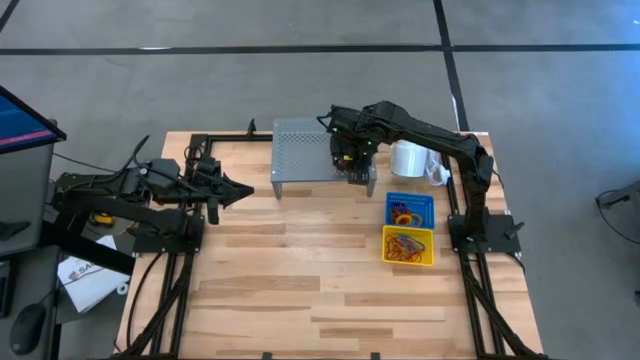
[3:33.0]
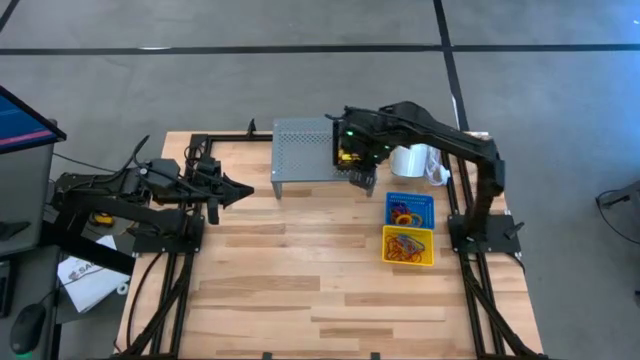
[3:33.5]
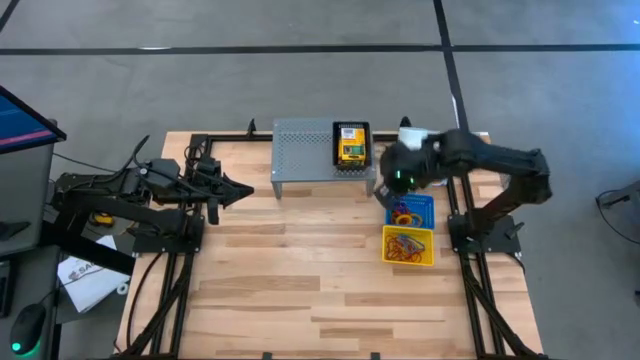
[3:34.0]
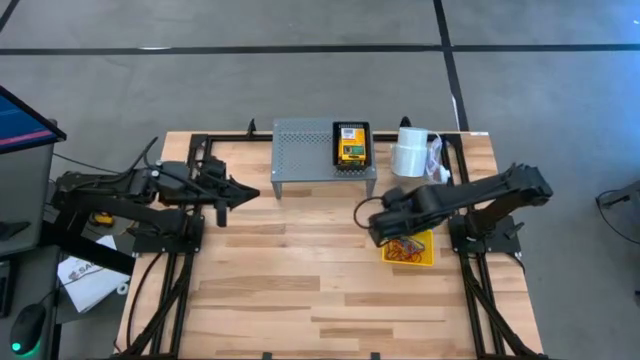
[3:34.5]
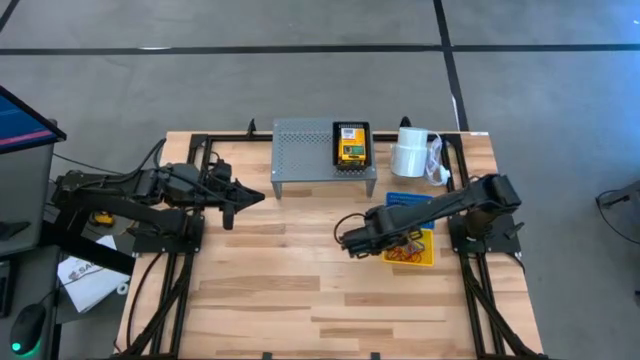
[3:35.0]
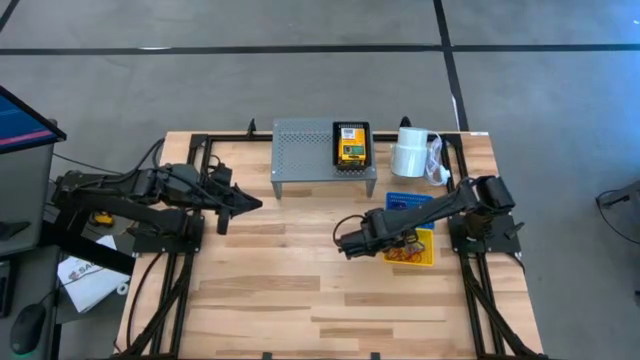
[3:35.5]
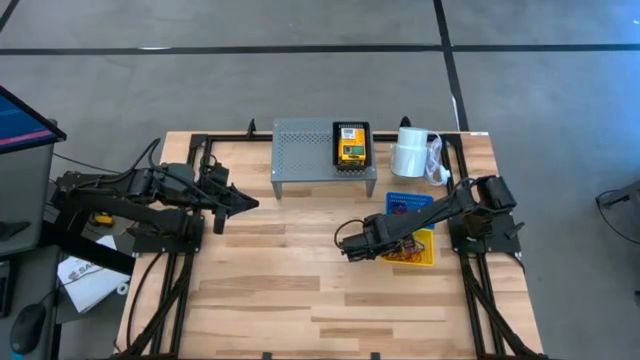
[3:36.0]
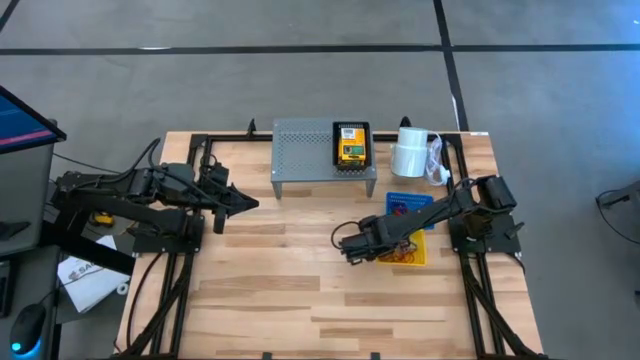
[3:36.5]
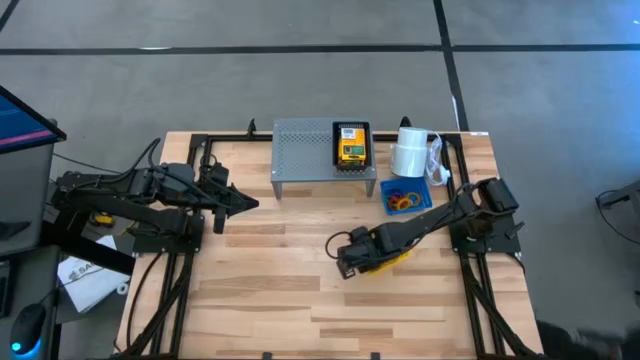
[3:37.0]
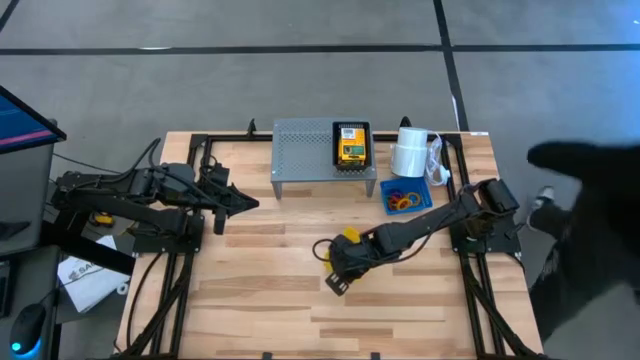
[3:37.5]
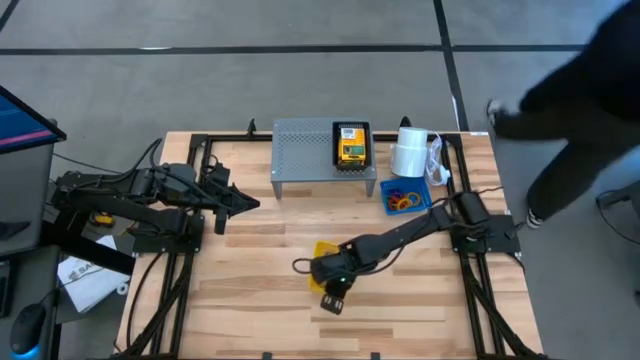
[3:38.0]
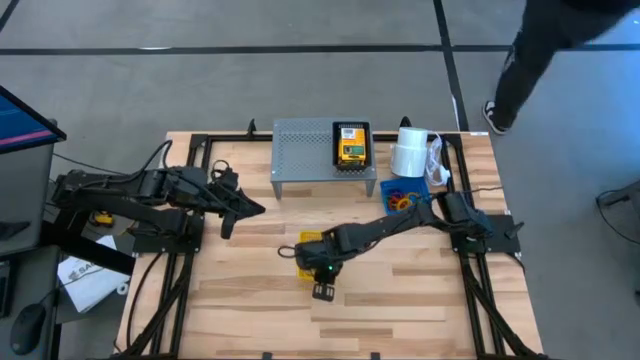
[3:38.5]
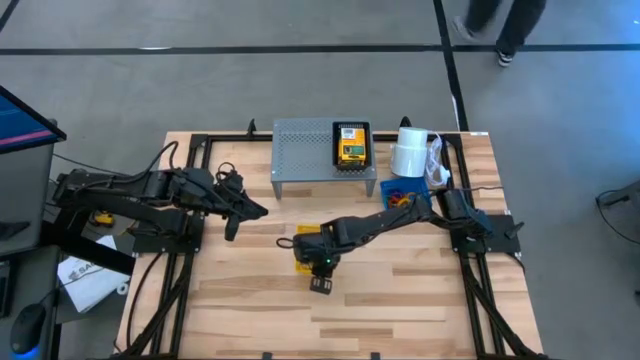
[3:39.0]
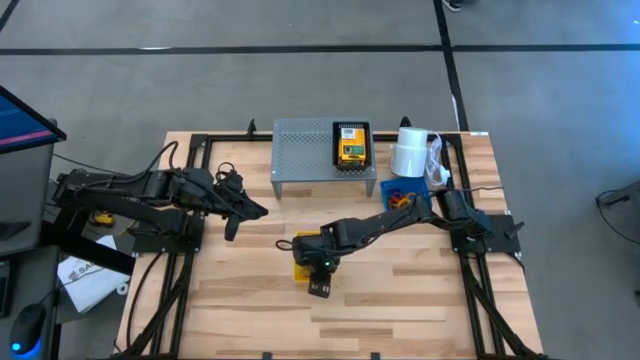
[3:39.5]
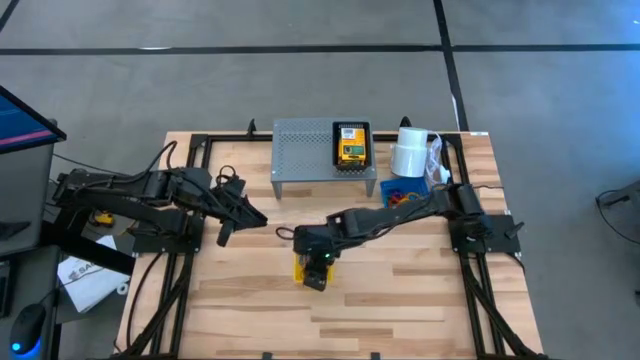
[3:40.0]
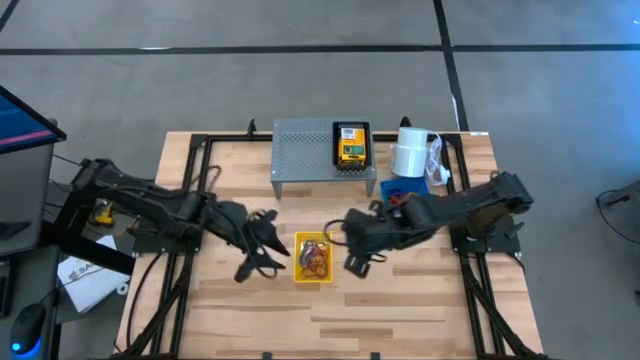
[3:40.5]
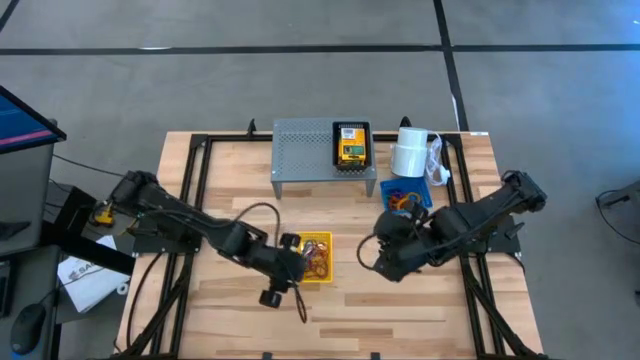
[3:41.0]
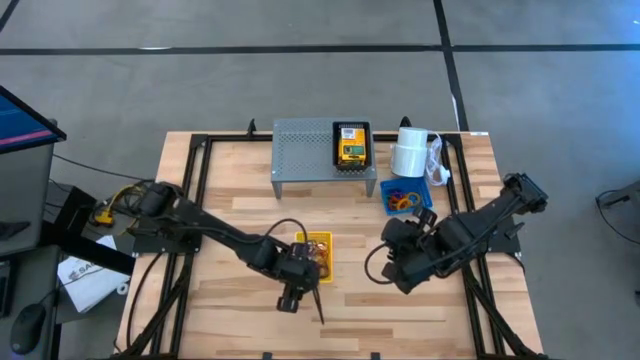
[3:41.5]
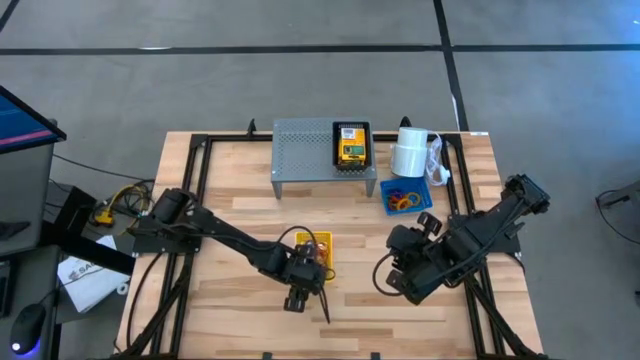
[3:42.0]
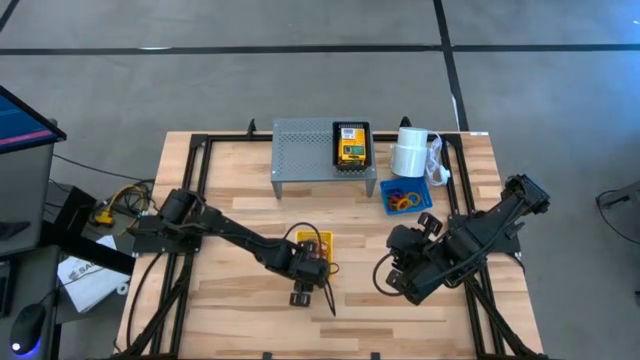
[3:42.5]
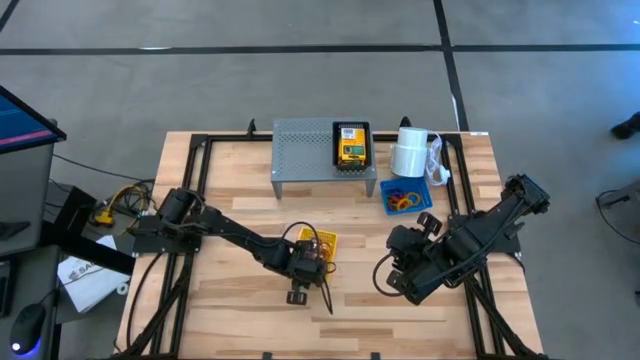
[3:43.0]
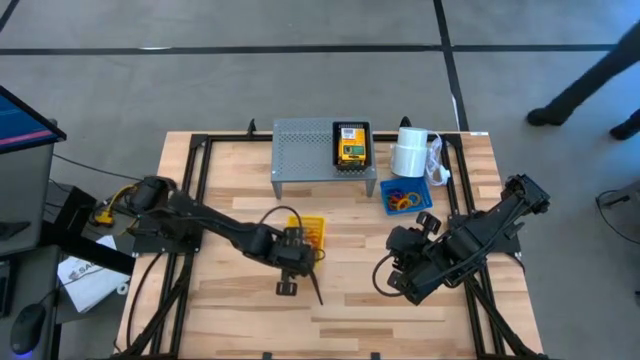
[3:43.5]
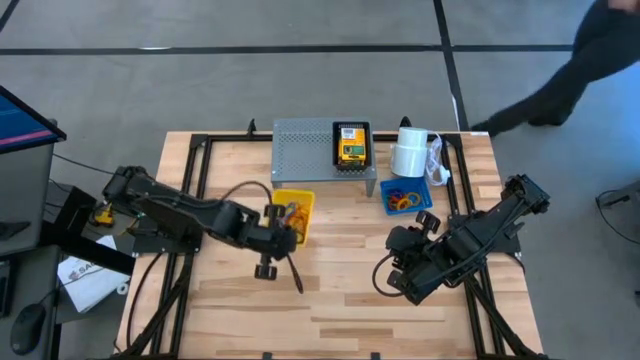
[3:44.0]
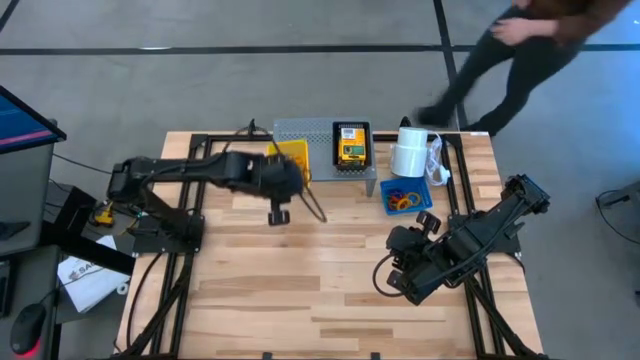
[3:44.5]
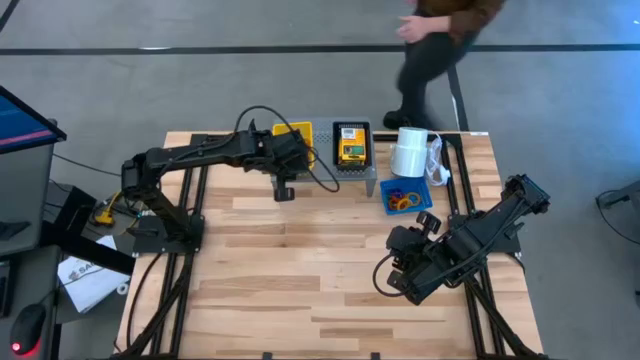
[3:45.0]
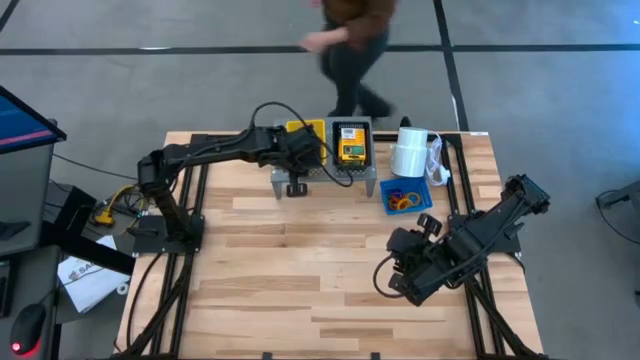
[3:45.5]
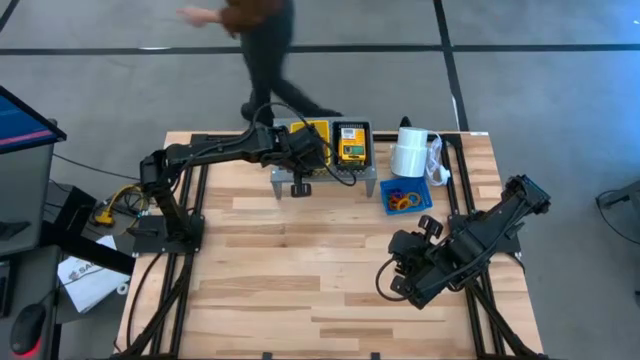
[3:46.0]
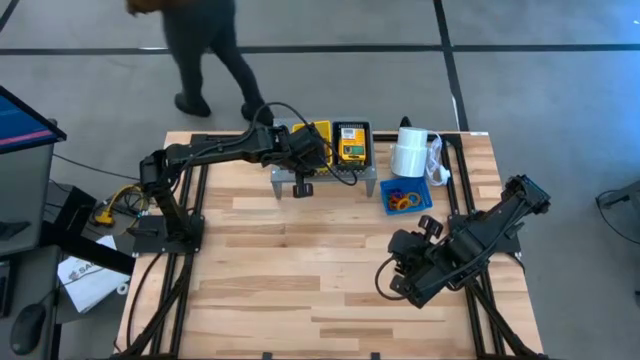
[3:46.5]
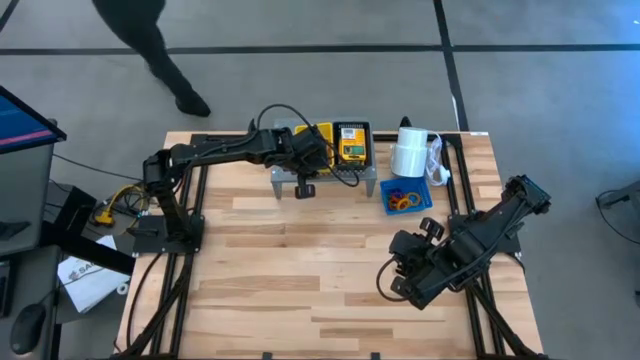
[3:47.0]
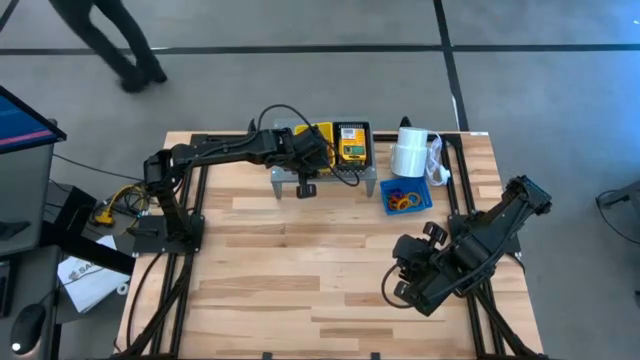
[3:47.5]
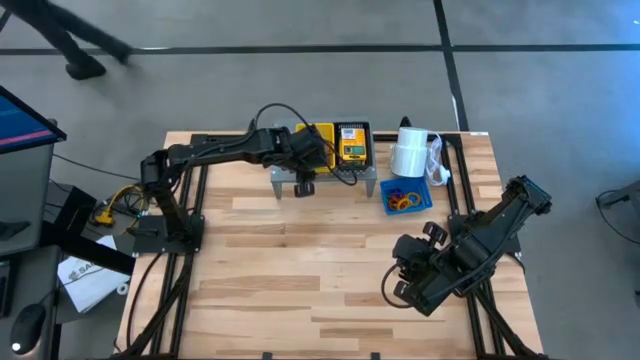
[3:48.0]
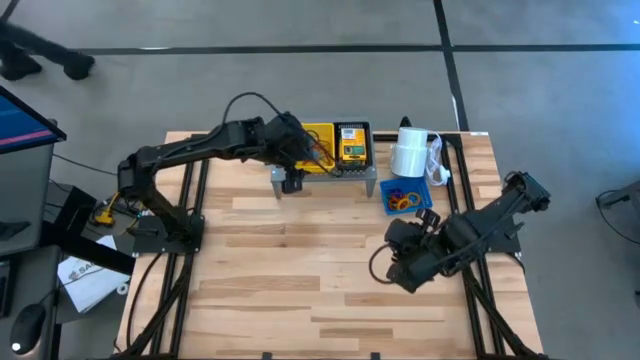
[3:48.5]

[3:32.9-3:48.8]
Task: Pick & Place Office Desk Supplies
Put the yellow basket on the shelf

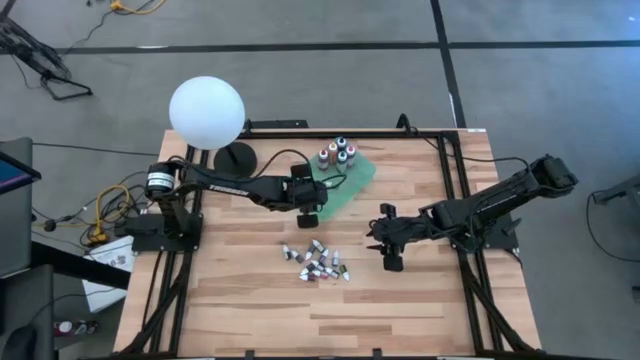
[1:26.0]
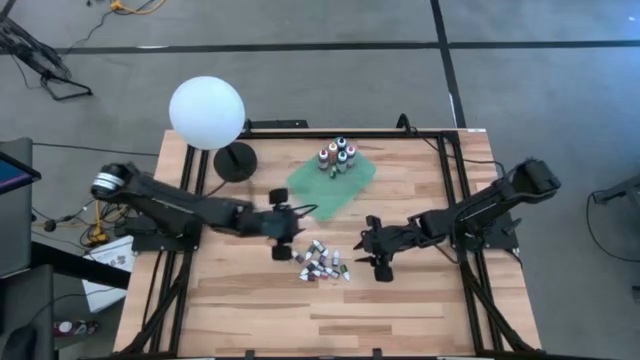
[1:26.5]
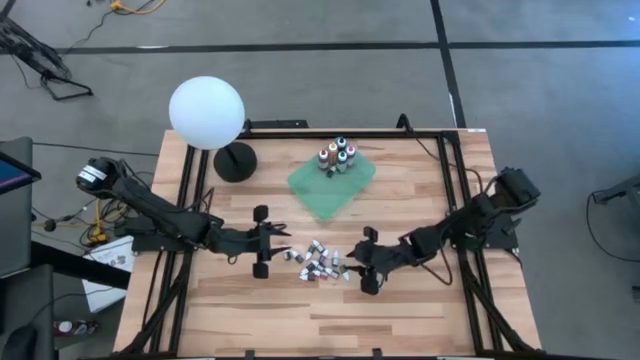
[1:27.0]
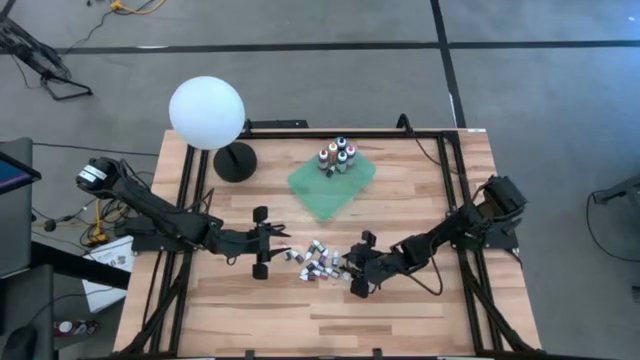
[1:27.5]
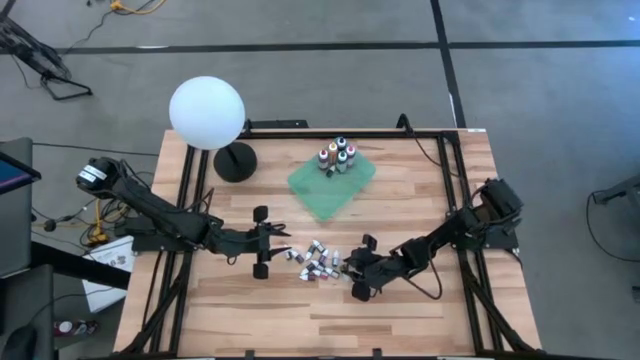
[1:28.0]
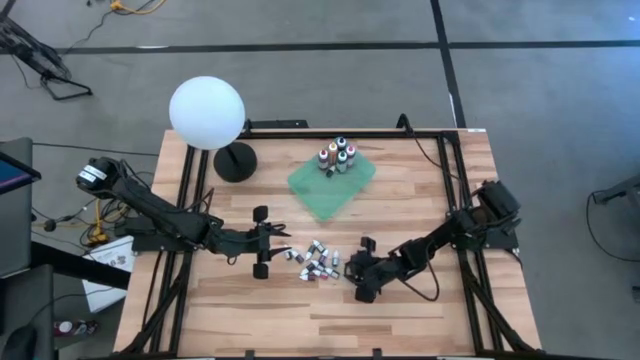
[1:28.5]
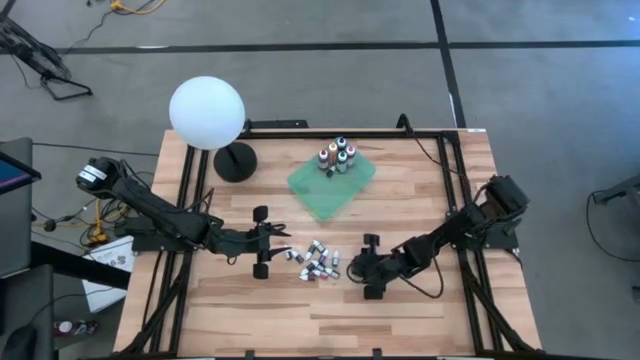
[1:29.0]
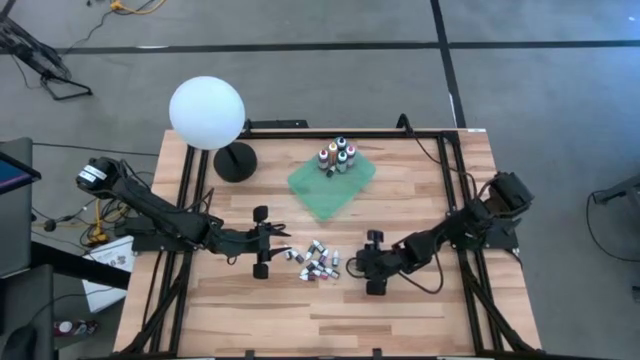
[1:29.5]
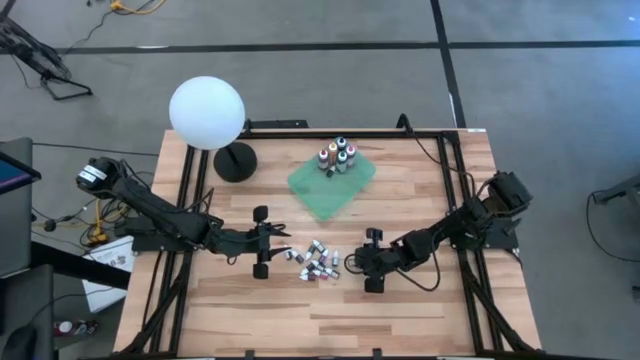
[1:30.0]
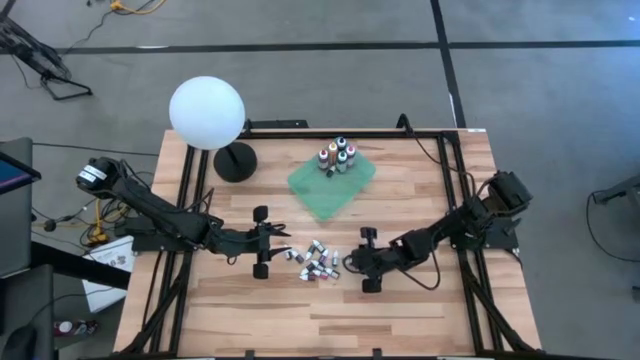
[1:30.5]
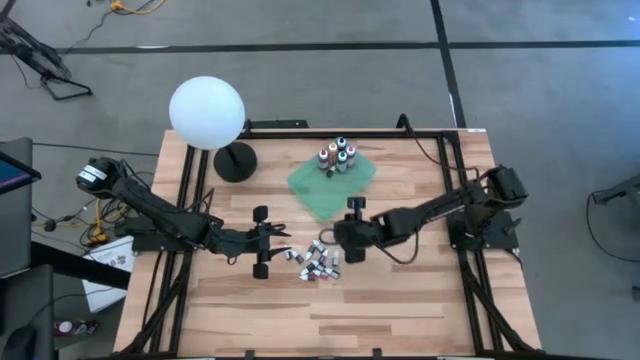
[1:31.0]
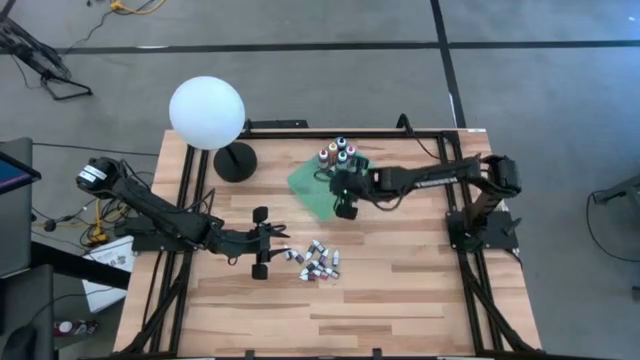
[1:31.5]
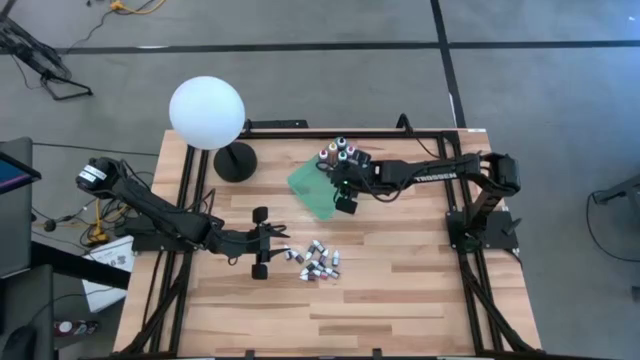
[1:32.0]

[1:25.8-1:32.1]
Task: Pick & Place food coloring
Put the right green food coloring bottle into the green bin
